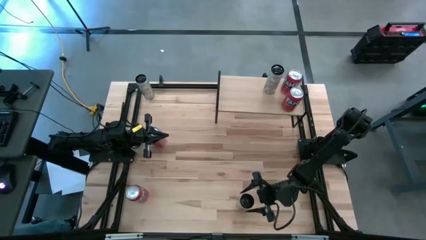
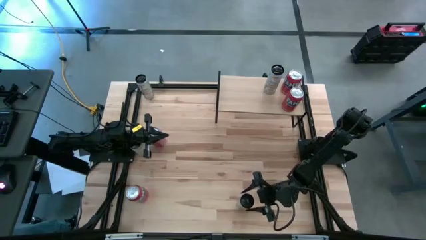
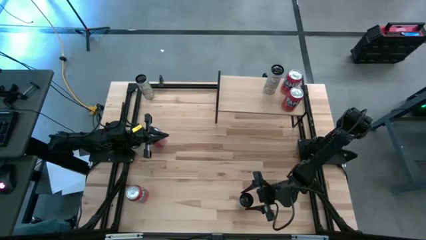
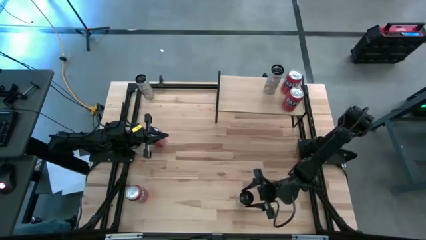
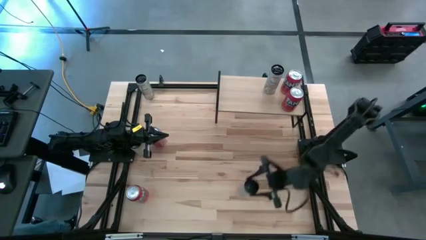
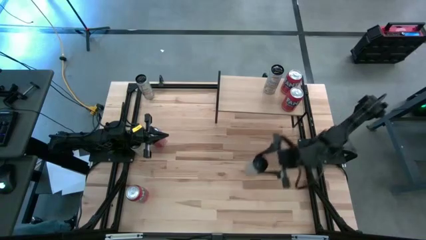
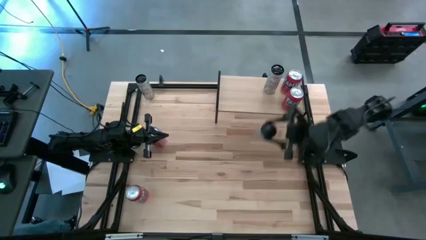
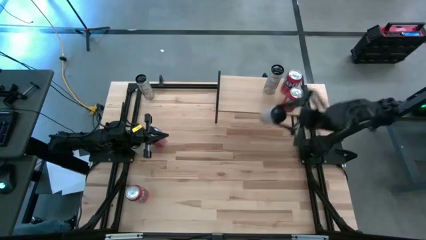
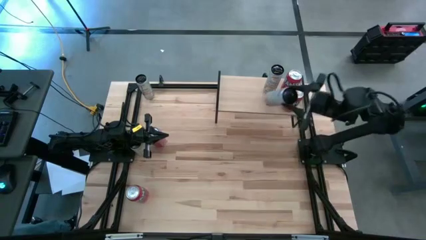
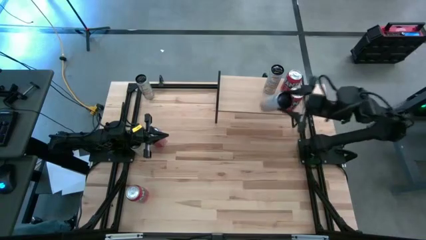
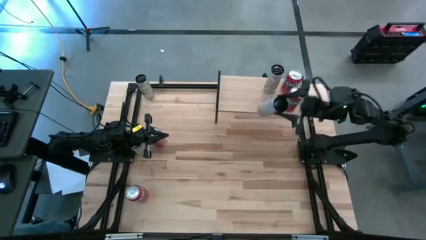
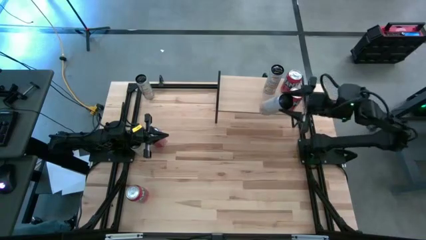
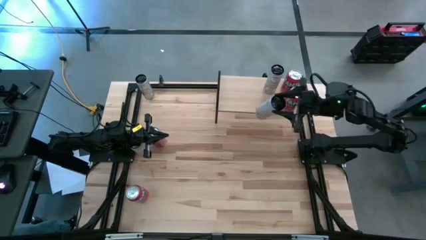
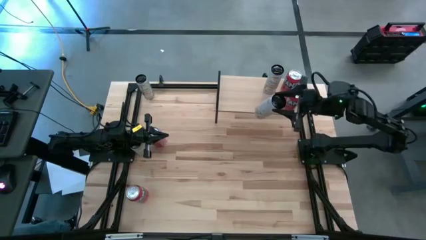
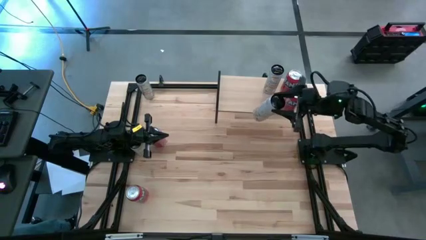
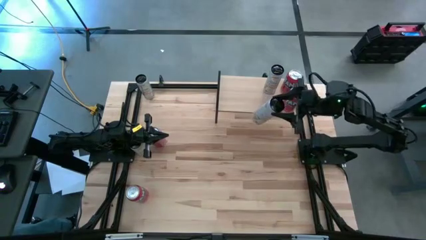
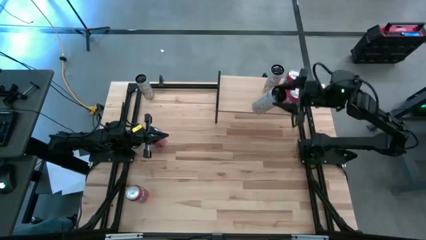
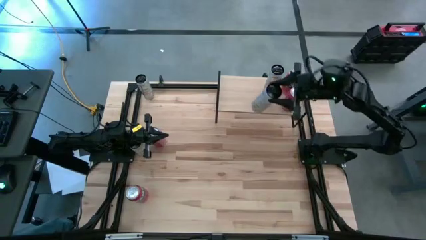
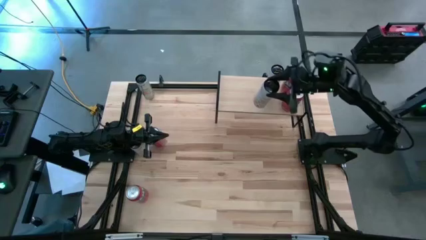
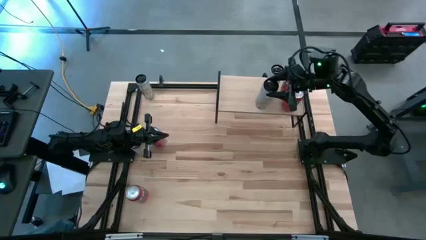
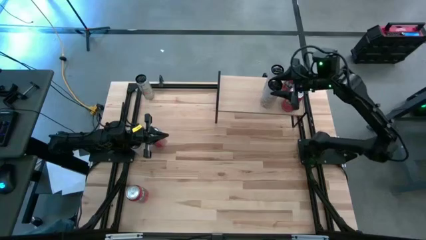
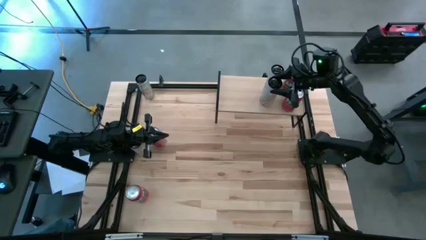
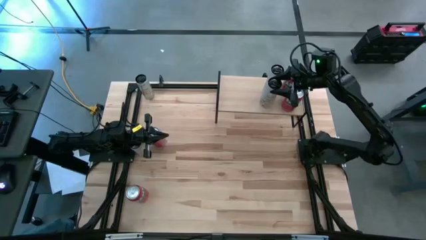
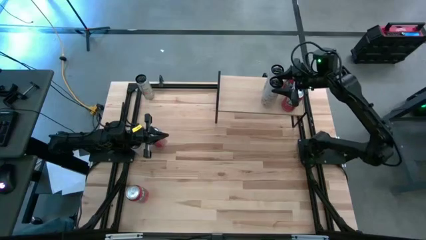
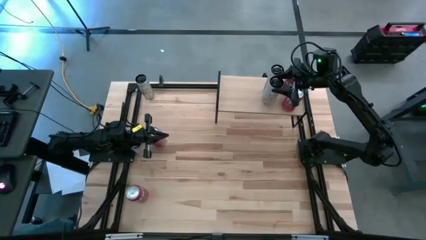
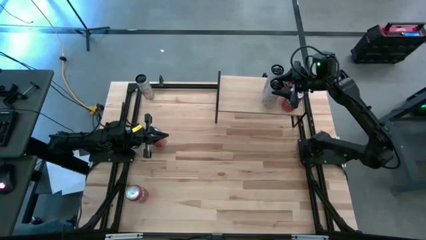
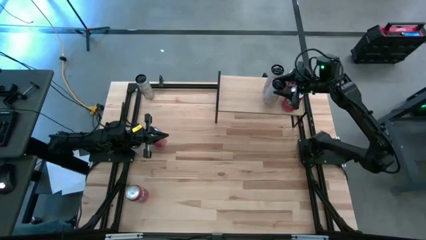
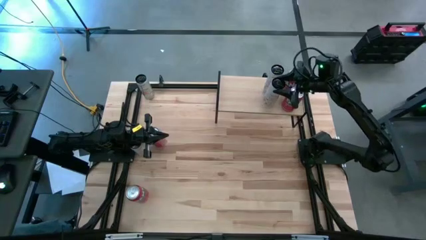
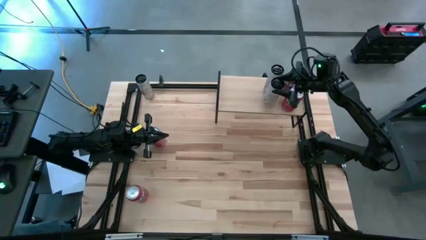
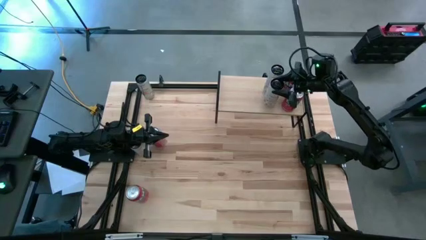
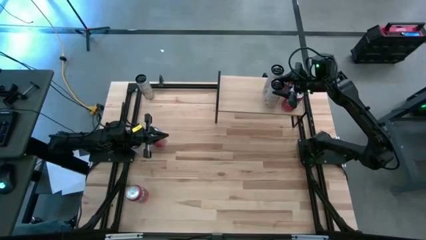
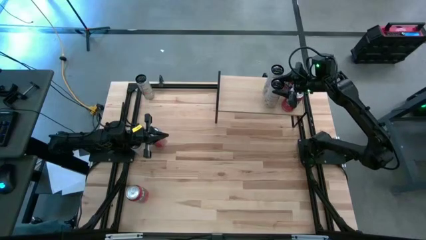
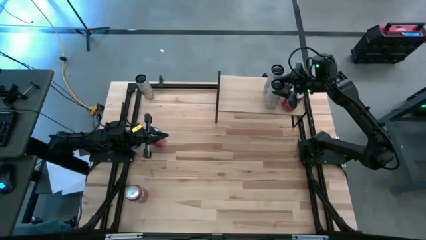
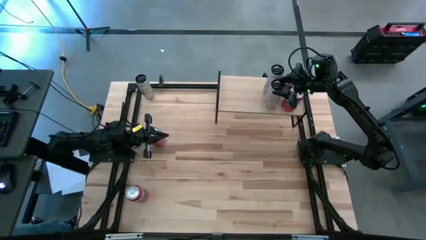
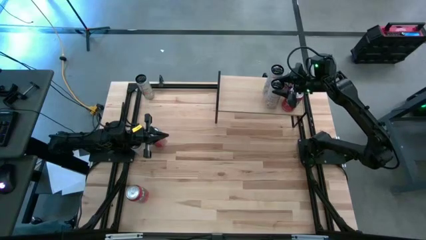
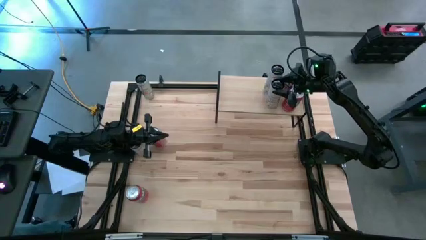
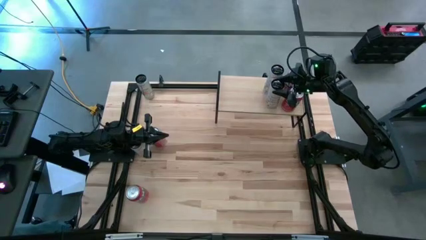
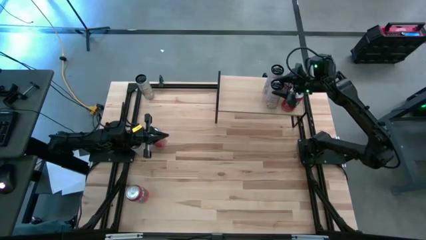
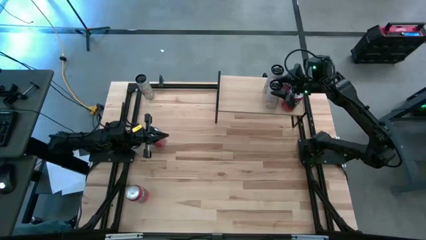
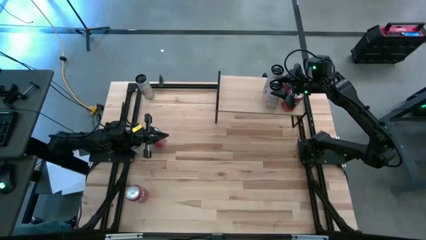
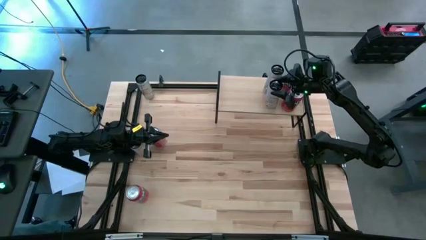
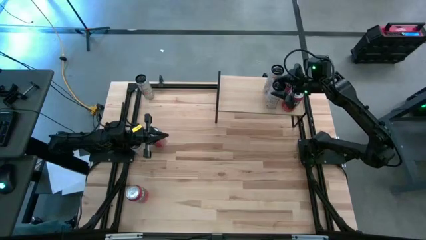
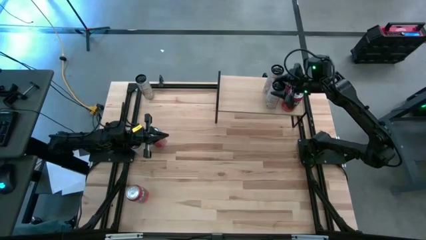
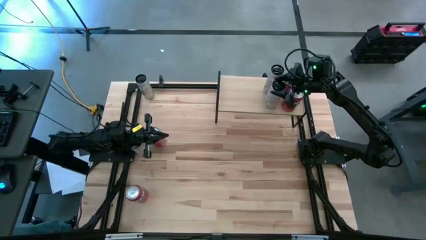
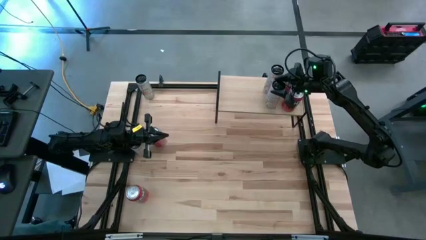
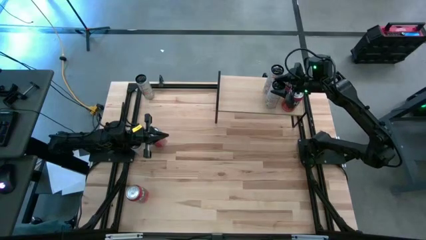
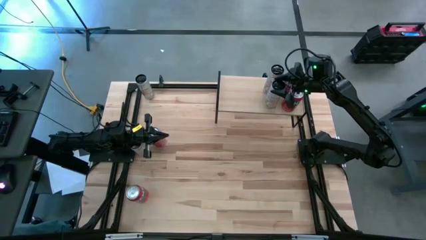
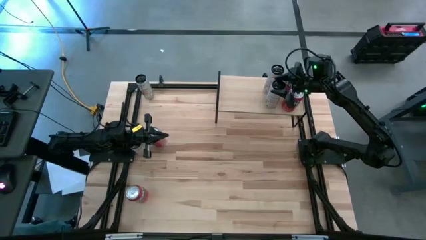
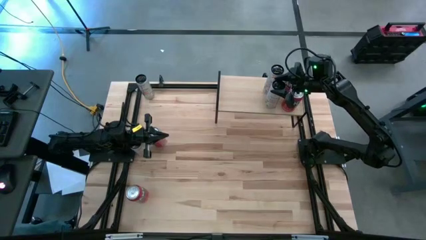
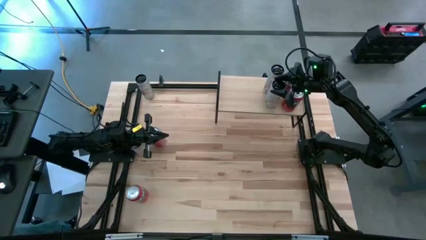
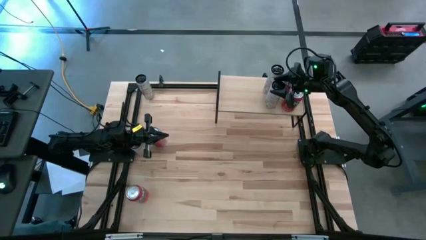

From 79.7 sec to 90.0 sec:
Task: Place canned beverage on shelf
Put the white soda can on the shelf aligned with the other white soda can

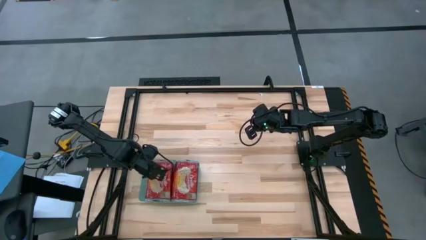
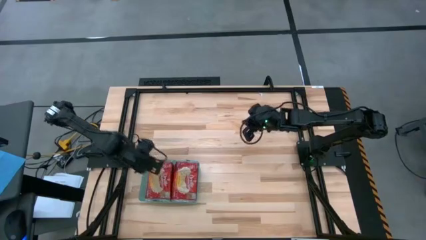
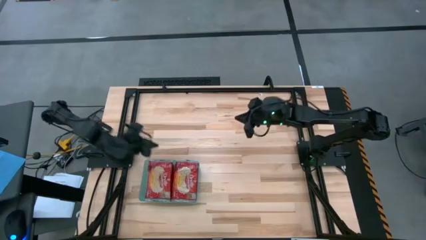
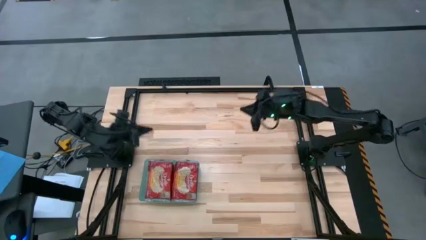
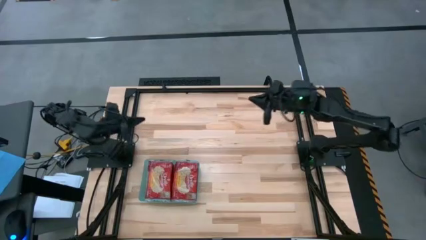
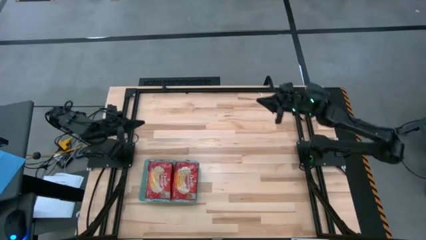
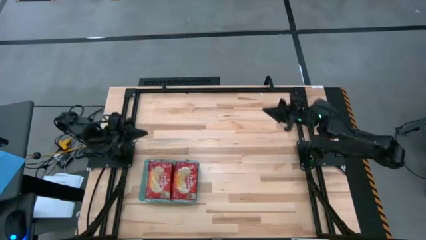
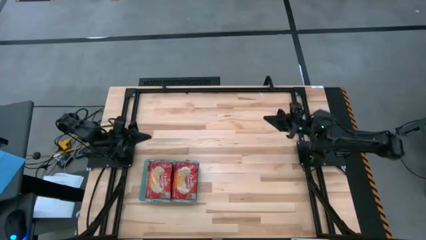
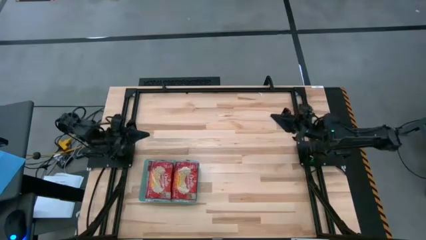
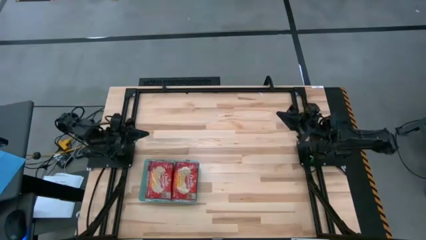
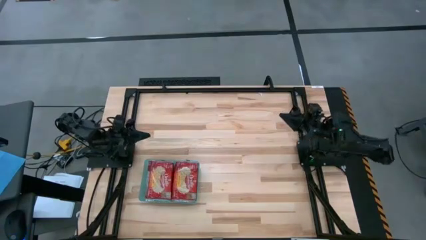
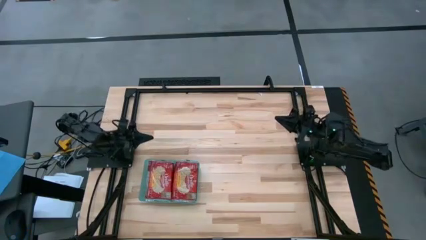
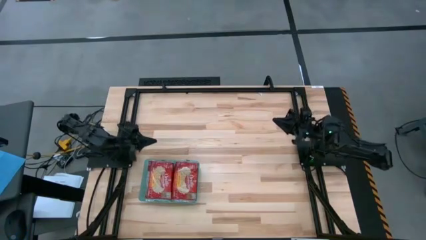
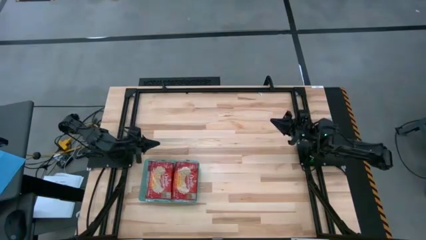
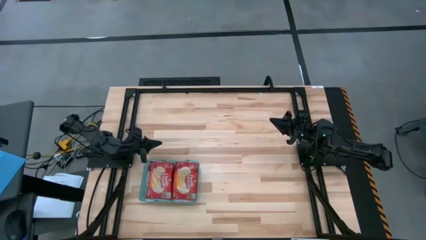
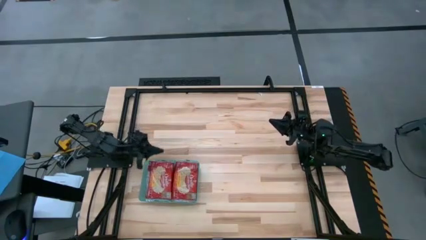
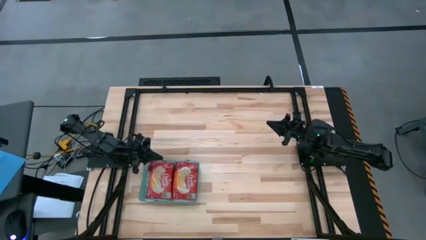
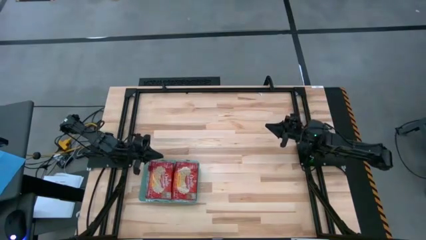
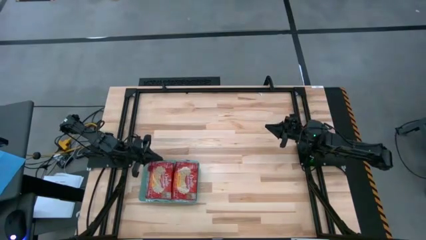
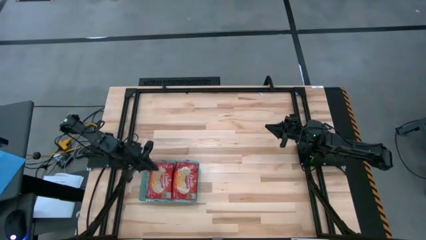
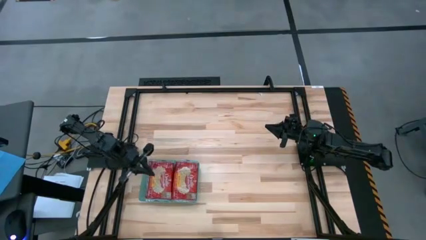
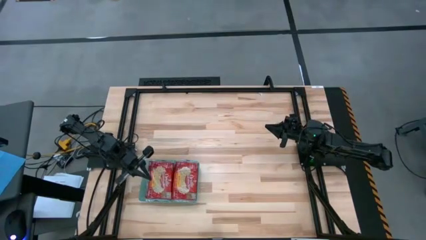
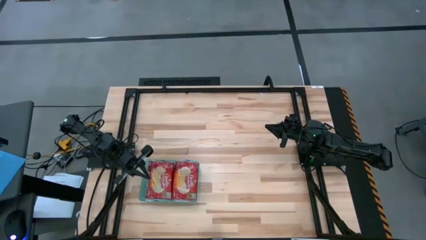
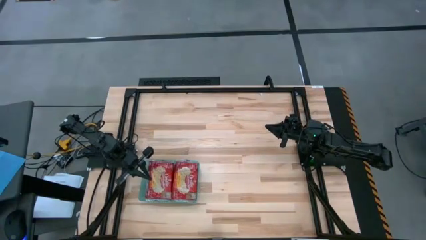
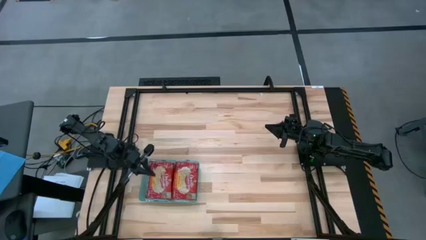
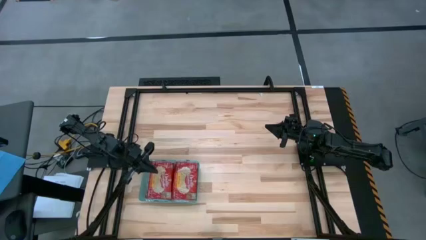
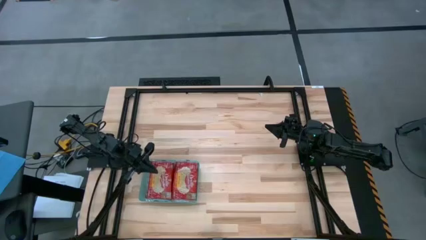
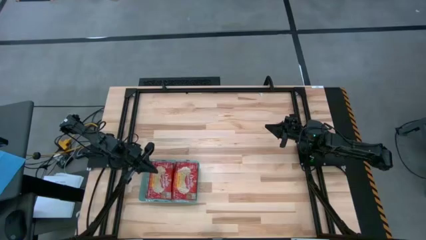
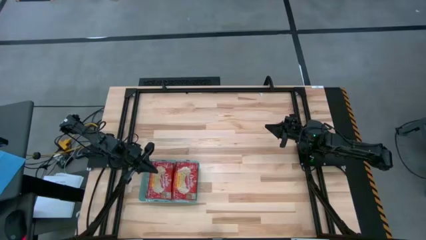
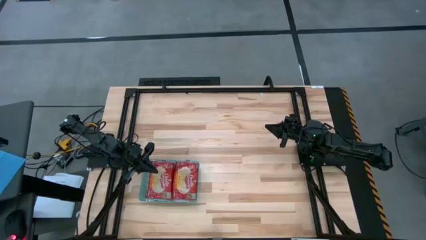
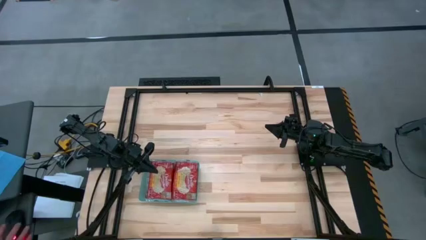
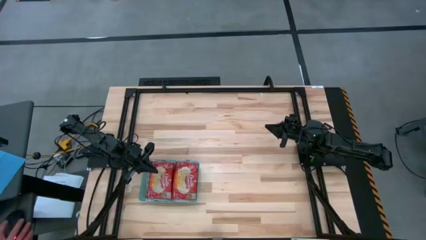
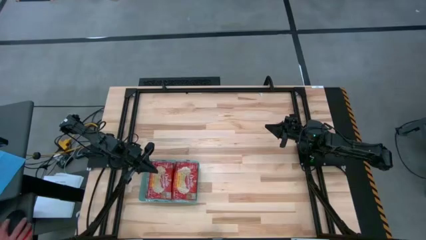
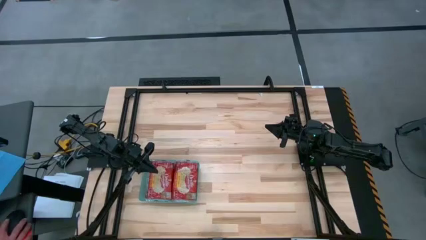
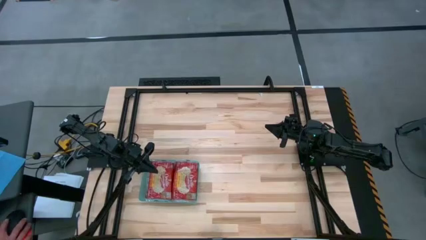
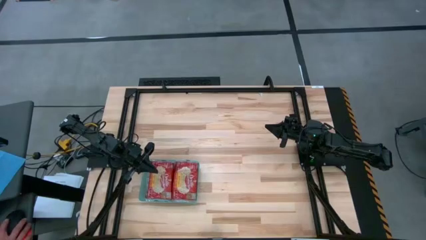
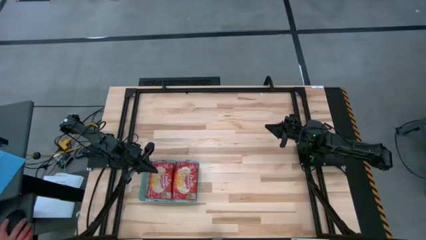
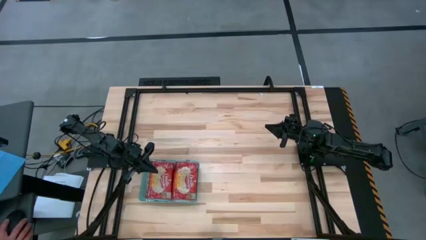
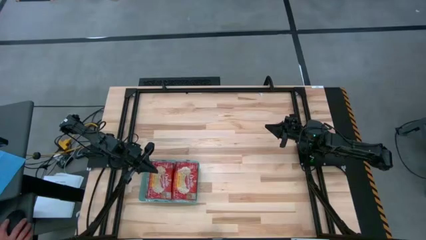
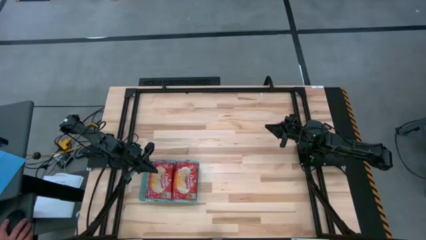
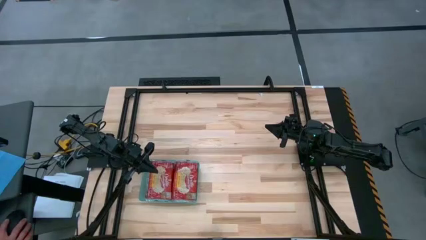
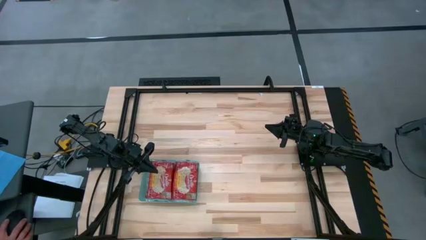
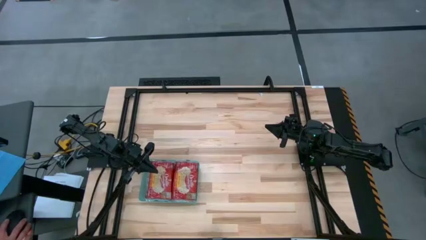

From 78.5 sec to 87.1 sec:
Task: Sort popcorn bags into baskets
Return to Home Position
